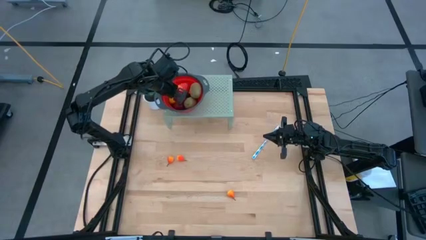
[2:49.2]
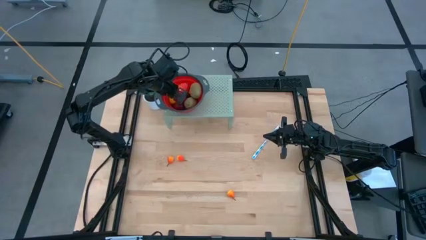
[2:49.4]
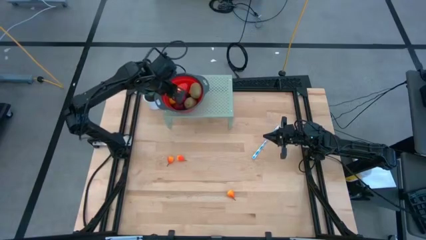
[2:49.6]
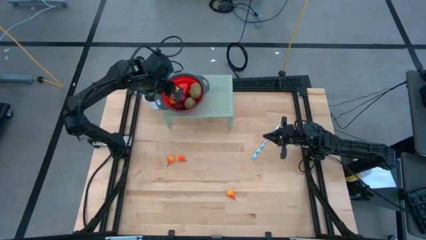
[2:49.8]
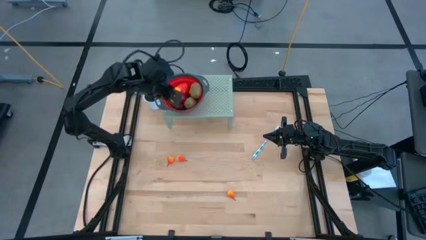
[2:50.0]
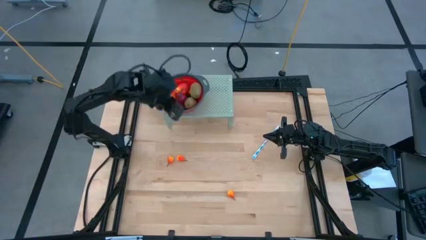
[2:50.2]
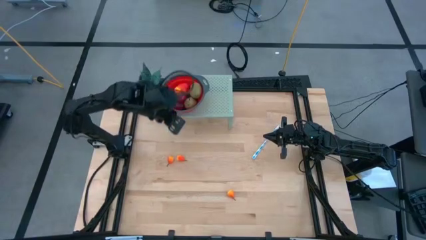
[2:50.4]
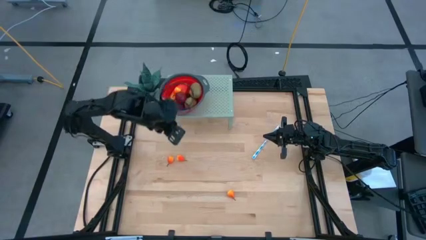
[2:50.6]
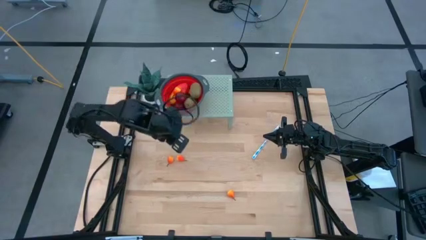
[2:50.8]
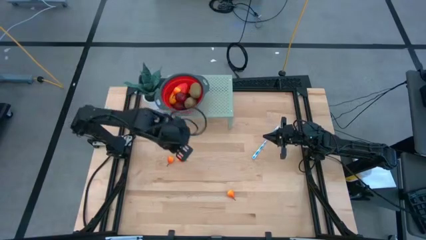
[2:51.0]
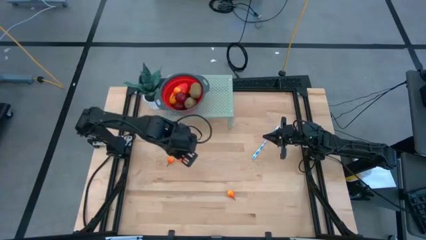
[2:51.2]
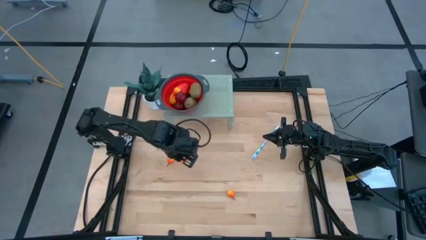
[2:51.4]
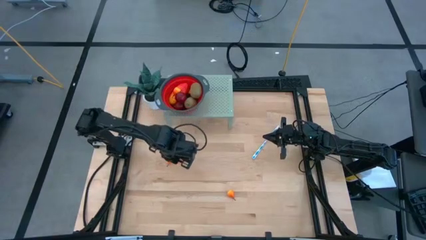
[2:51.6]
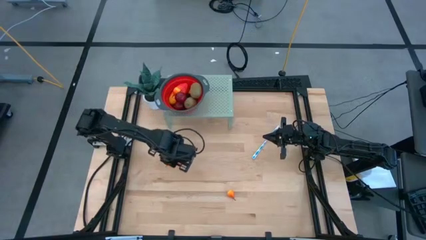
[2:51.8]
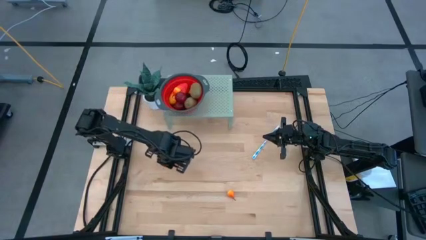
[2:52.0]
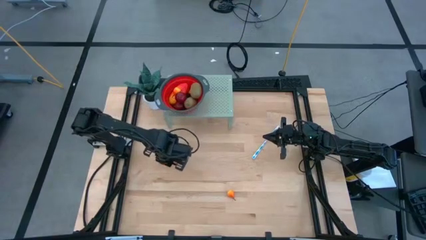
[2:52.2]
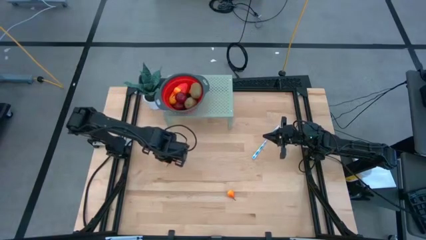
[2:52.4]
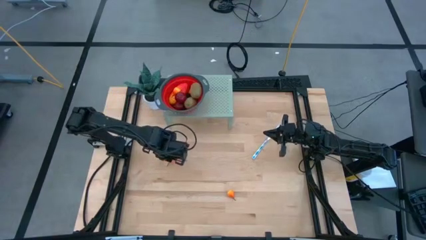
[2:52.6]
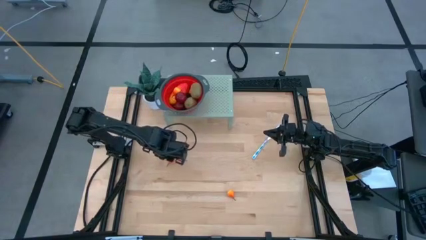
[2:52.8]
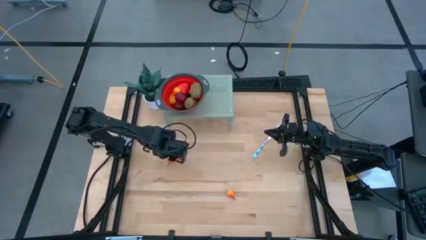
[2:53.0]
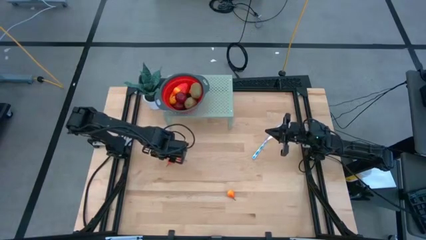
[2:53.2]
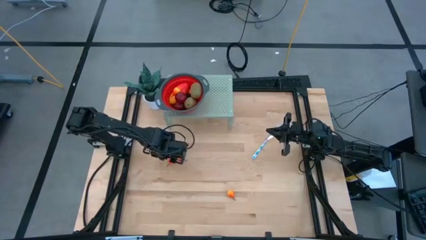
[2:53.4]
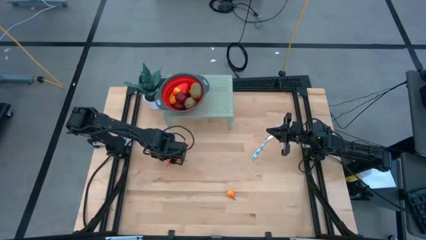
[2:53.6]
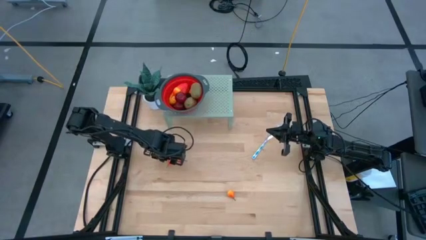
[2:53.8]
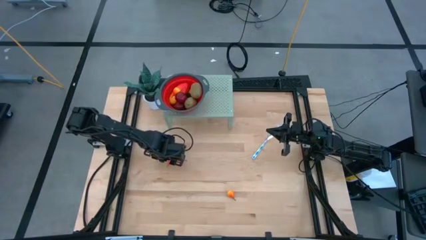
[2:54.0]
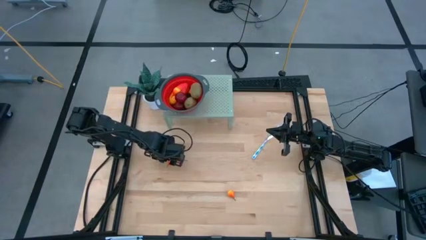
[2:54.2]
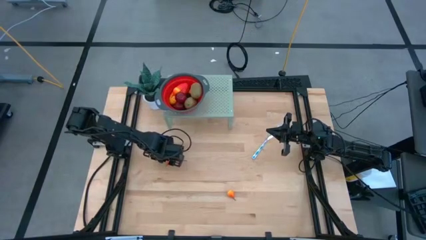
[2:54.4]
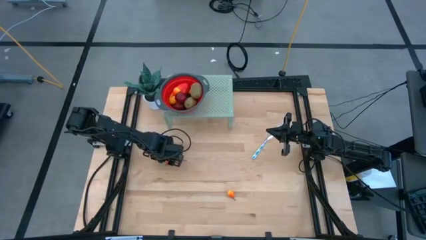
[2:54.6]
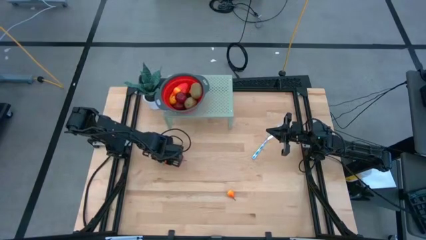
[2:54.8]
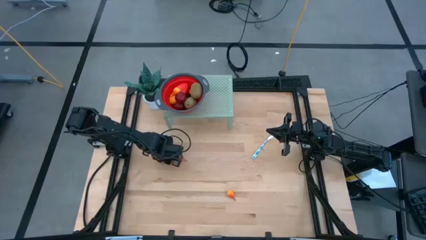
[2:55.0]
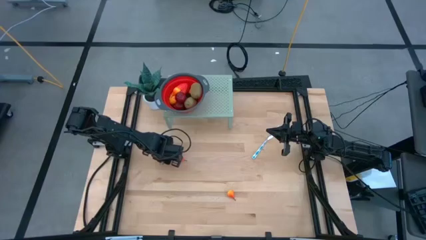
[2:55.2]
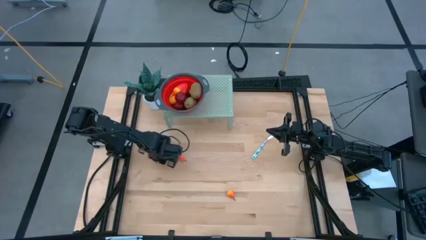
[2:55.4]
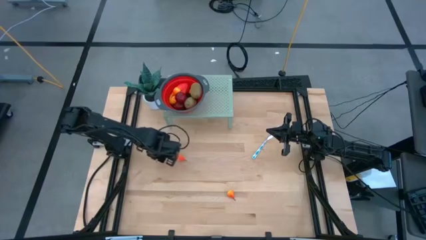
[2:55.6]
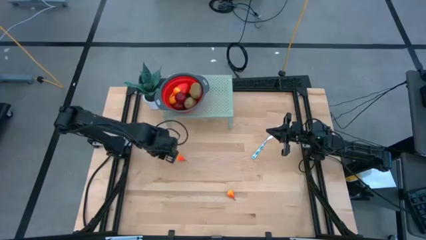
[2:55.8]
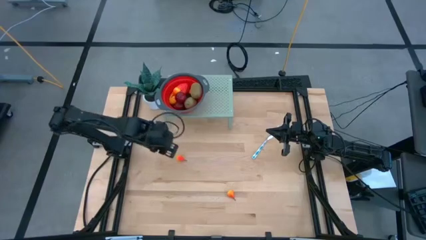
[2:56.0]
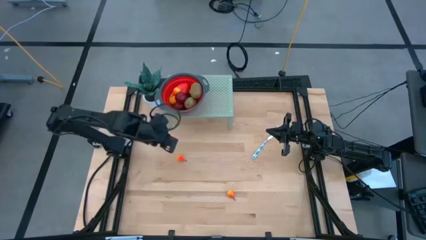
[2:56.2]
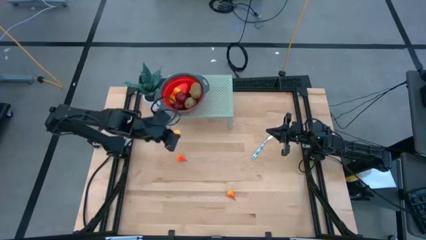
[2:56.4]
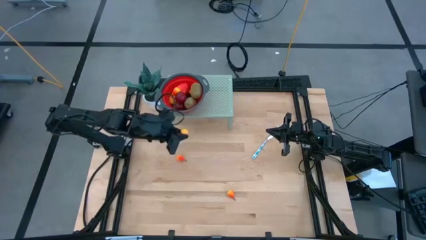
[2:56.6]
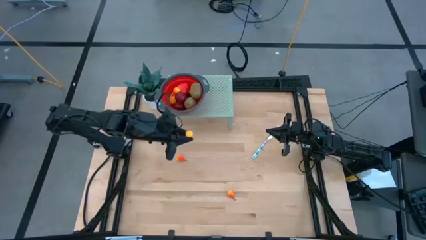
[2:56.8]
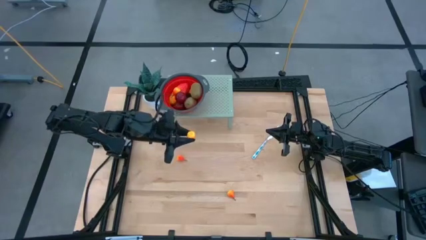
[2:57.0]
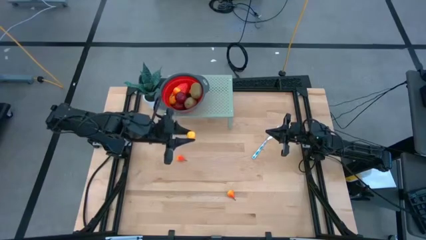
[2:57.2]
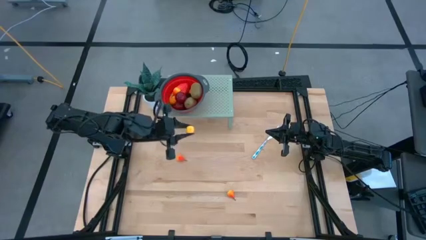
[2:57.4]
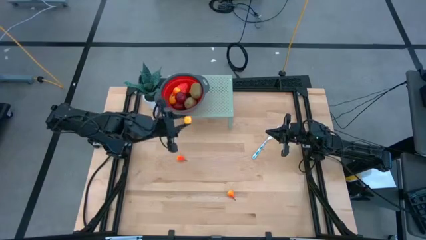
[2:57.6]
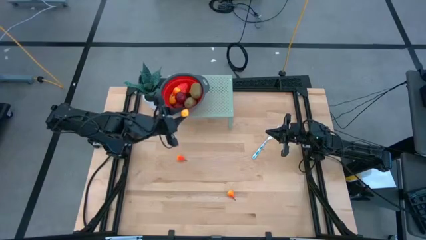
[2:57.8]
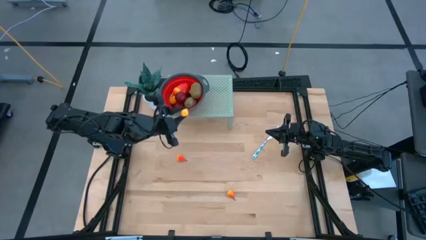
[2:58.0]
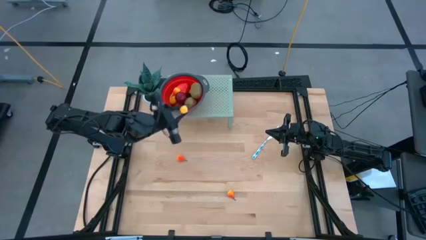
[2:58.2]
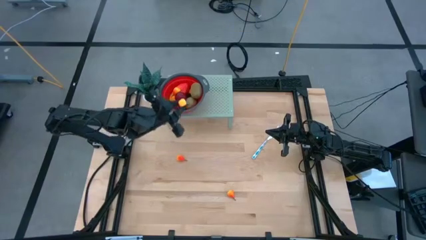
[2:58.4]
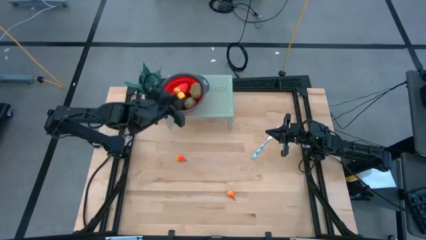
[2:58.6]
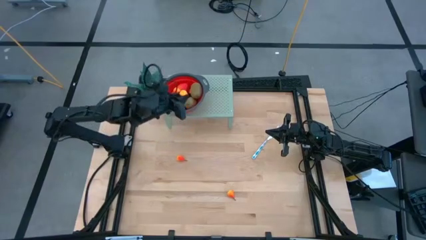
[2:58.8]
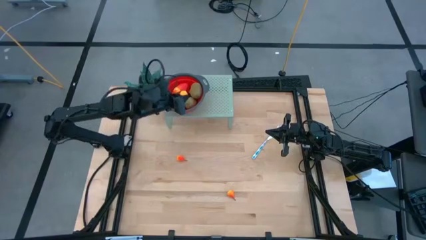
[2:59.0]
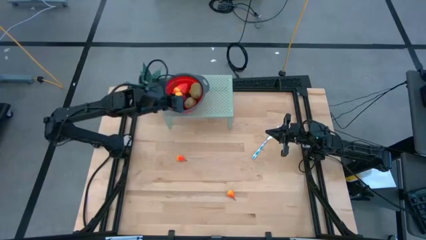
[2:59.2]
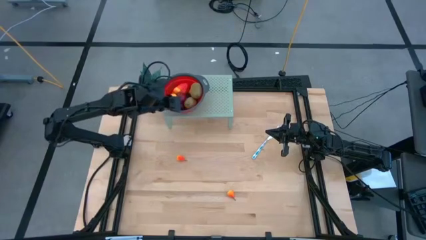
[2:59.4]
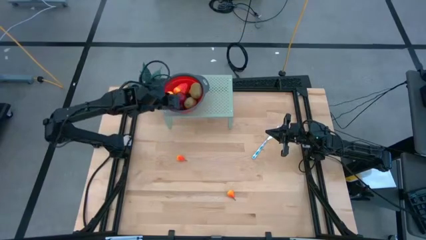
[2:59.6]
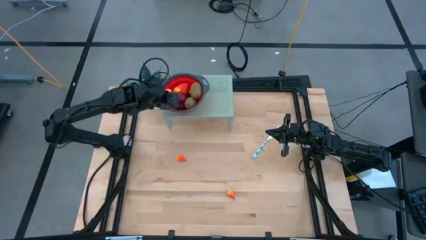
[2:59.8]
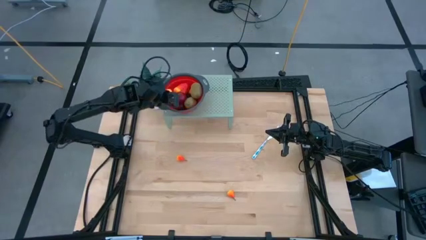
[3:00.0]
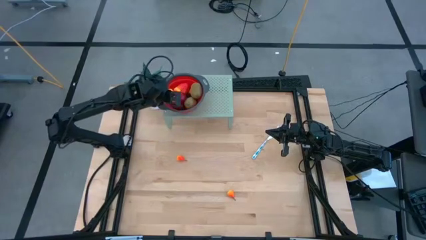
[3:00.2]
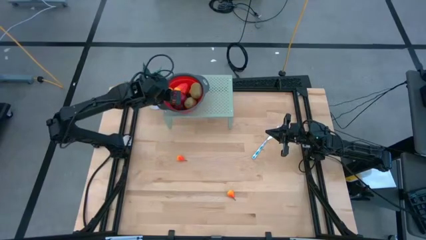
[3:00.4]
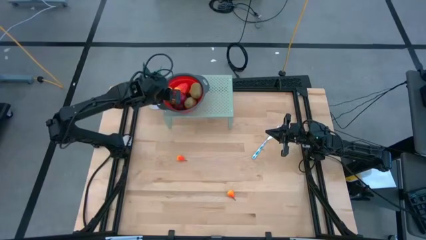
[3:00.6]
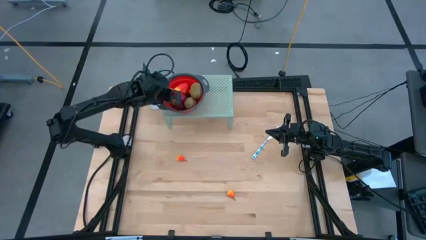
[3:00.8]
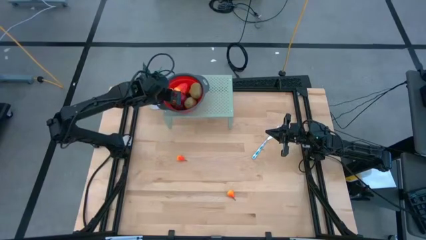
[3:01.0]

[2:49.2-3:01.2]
Task: Pick & Place Fruit
Put the pear into the red strainer bowl on the shelf
